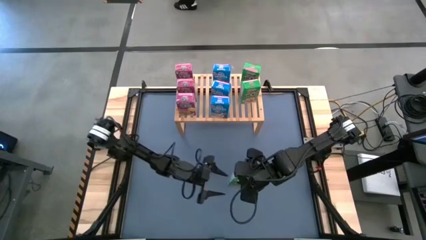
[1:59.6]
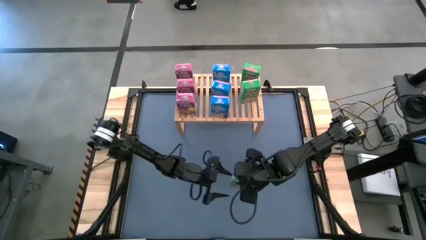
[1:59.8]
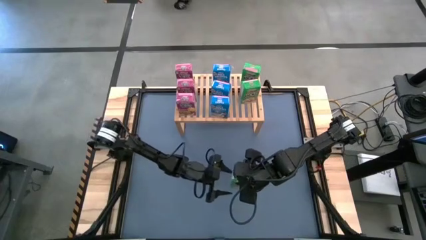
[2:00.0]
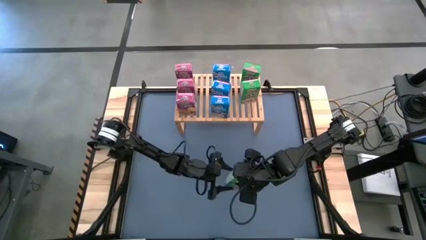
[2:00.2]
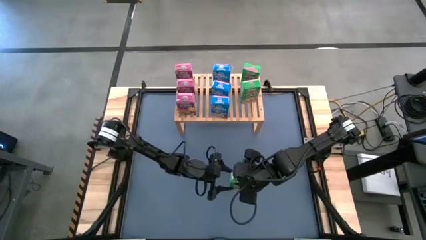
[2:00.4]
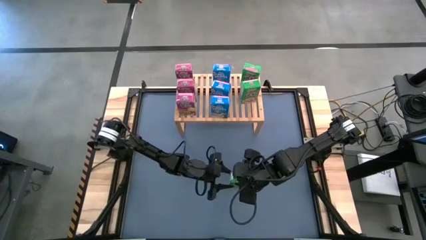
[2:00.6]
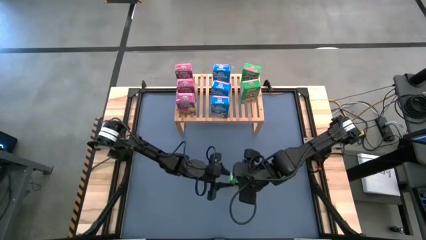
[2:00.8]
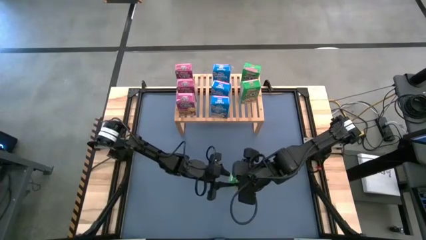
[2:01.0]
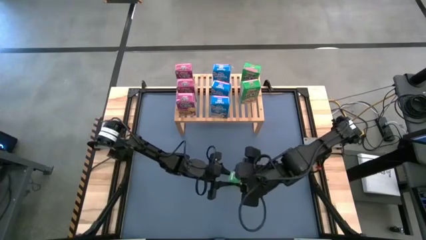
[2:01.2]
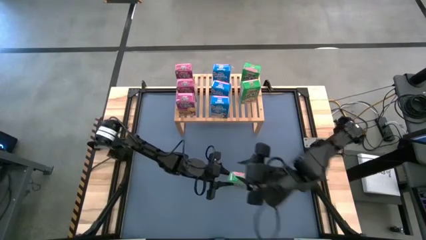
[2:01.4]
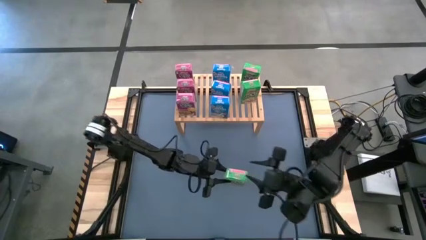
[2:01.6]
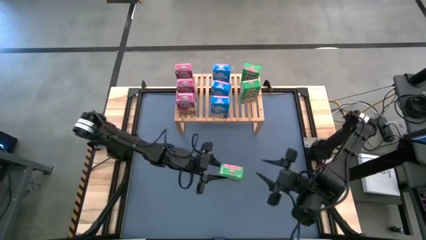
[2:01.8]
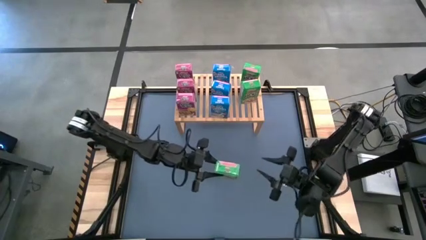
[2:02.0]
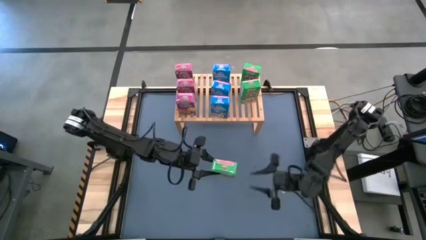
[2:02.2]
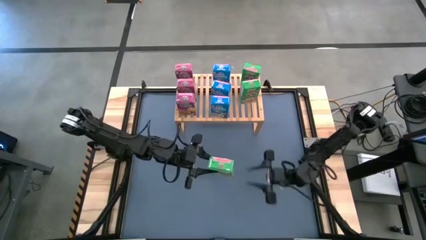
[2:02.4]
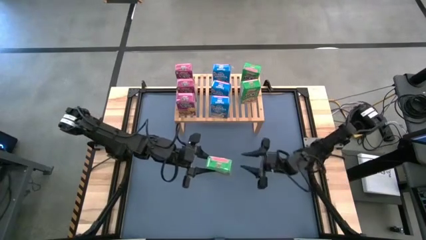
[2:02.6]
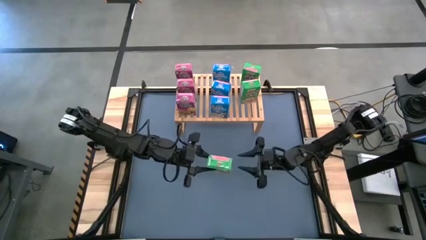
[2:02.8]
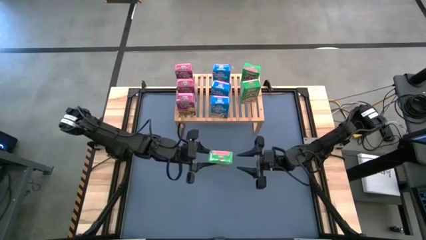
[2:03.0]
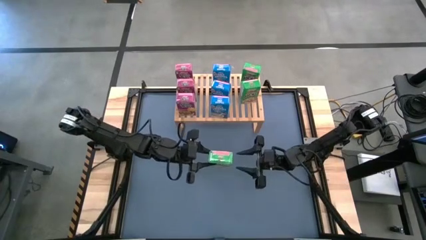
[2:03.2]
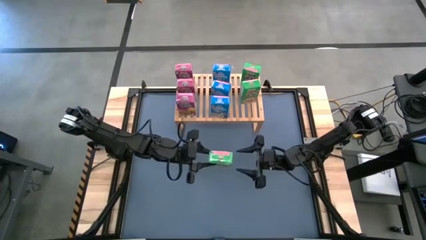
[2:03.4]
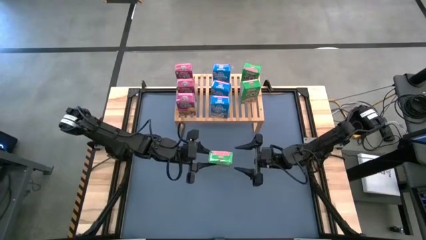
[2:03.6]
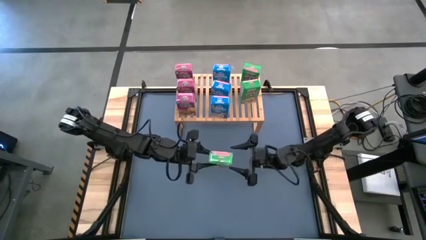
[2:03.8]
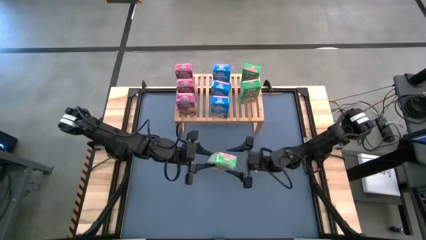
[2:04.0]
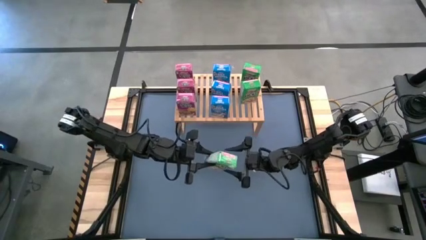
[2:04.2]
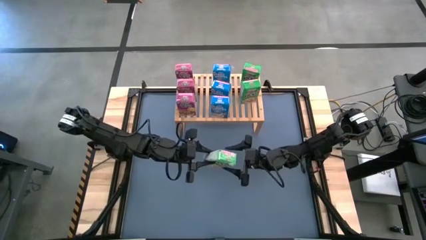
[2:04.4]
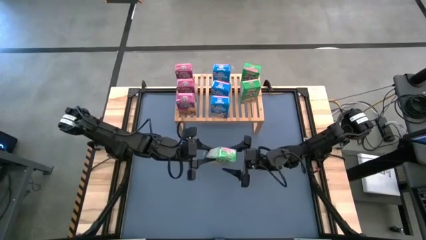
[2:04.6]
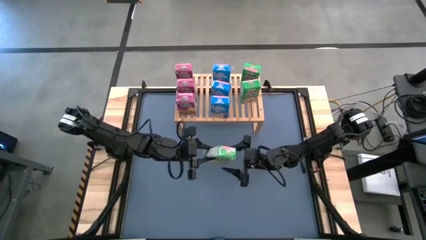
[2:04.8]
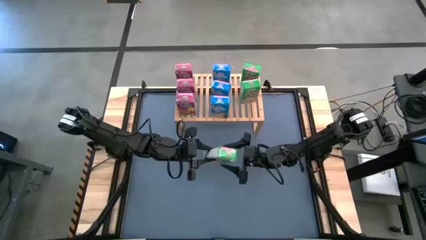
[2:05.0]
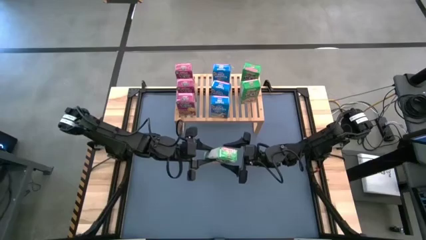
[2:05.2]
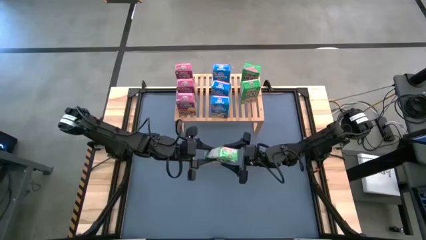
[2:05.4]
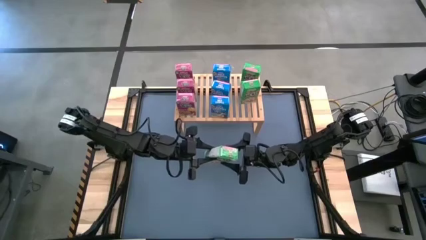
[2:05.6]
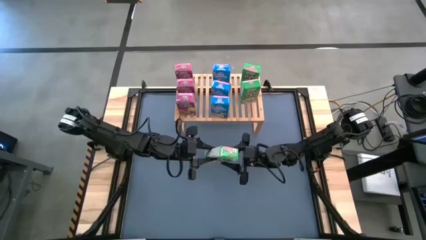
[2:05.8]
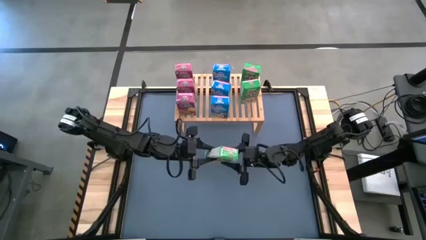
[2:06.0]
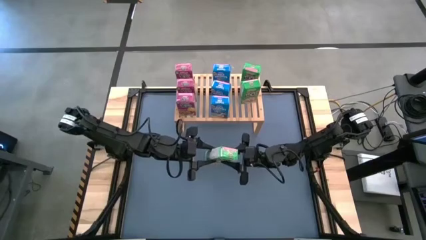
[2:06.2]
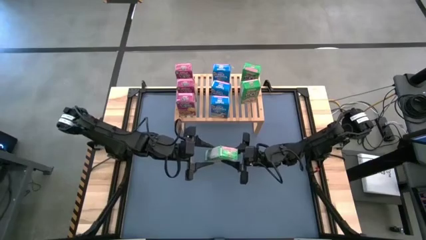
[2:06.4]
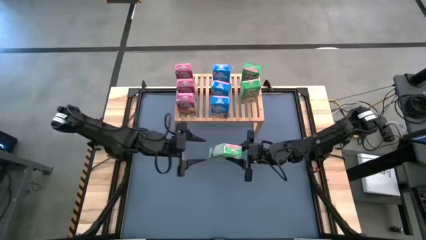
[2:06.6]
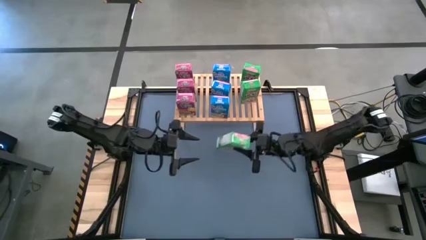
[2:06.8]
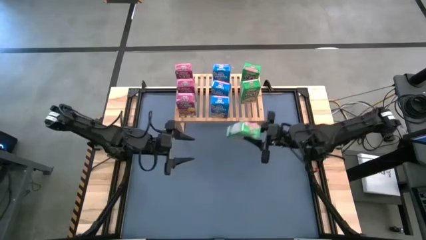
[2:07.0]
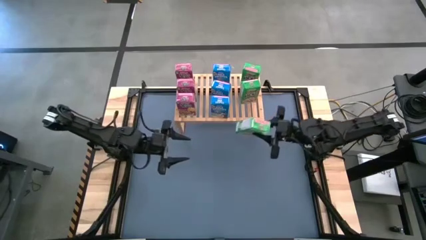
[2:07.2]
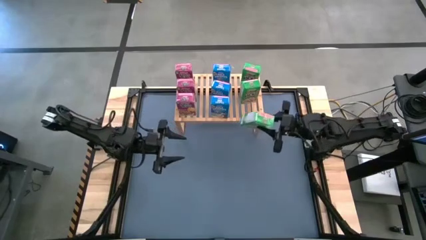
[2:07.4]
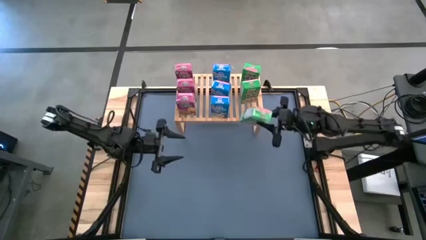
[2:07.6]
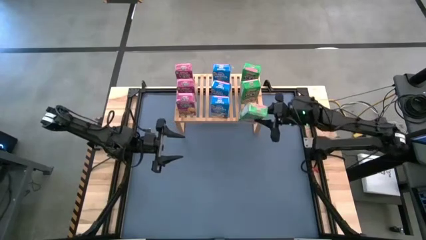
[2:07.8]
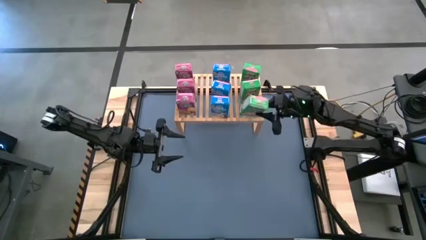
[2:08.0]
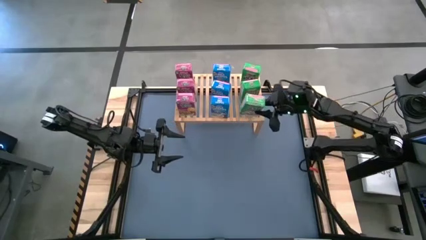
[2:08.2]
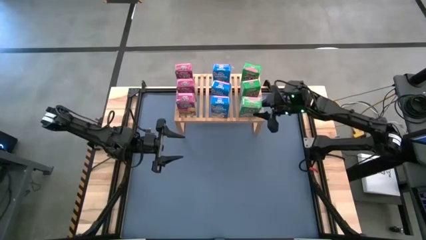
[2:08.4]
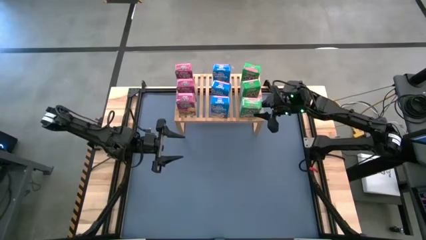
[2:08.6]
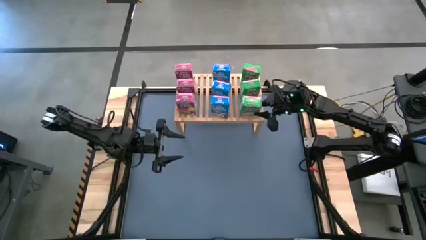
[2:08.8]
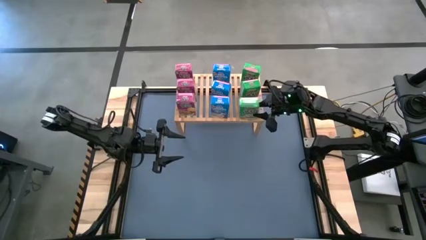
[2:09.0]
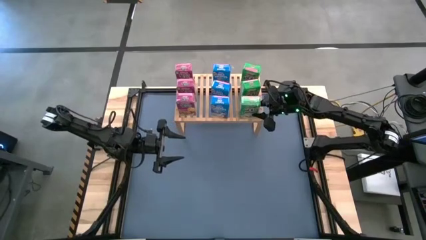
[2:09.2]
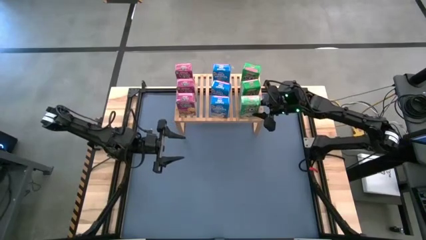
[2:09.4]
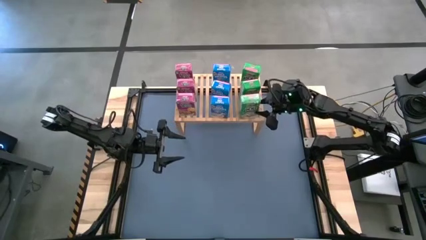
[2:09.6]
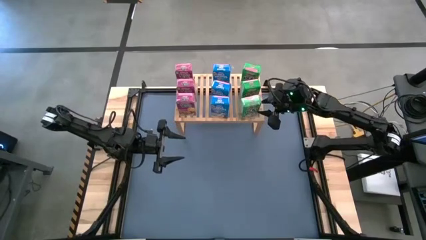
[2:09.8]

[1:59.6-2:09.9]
Task: Stack cereal on shelf
Put the green cereal box on the shelf aligned with the other green cereal boxes

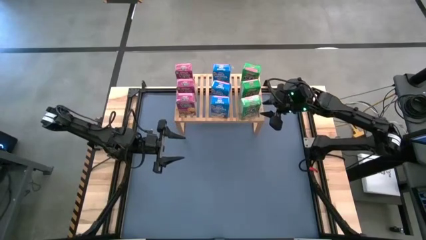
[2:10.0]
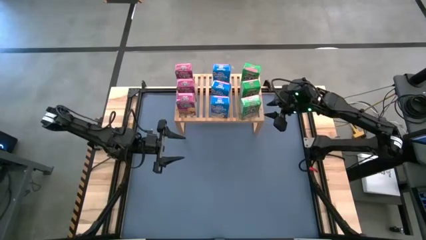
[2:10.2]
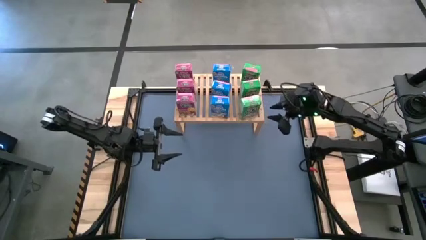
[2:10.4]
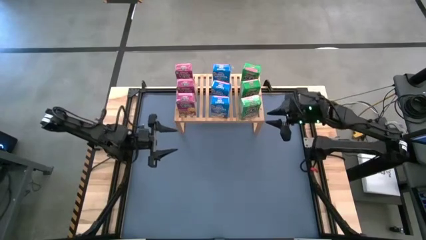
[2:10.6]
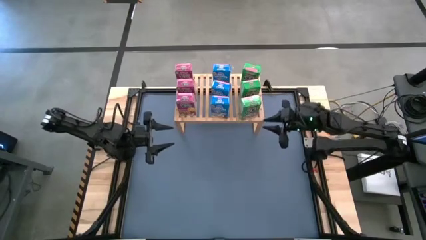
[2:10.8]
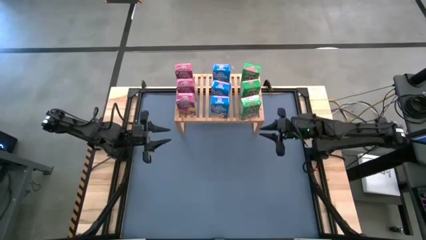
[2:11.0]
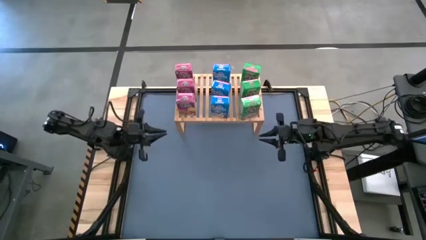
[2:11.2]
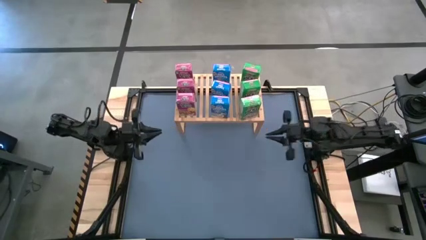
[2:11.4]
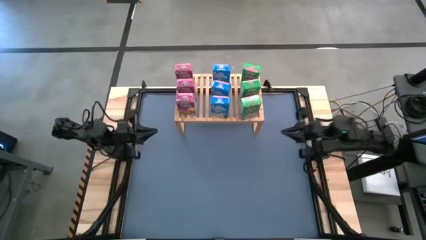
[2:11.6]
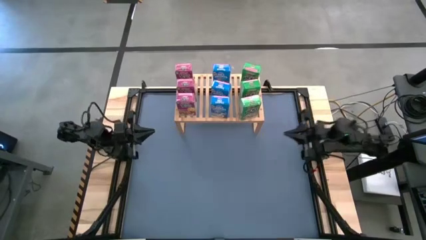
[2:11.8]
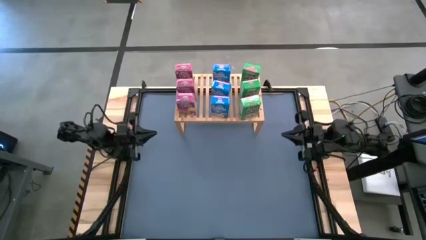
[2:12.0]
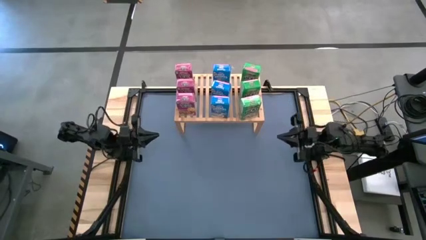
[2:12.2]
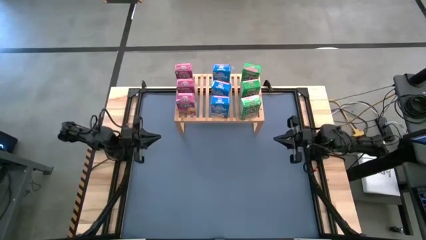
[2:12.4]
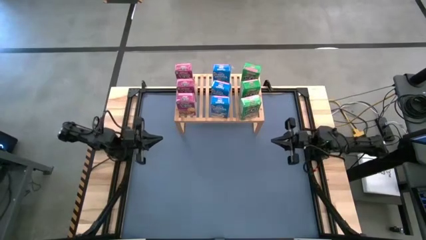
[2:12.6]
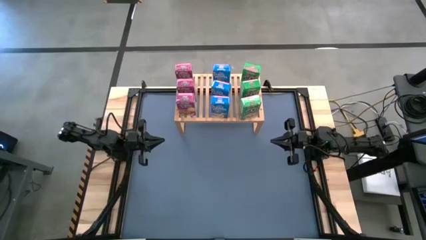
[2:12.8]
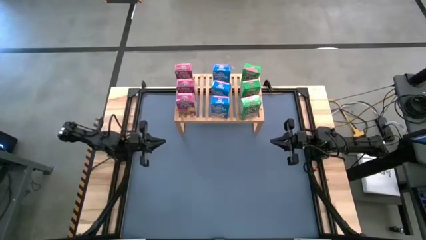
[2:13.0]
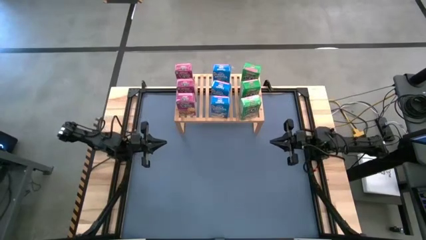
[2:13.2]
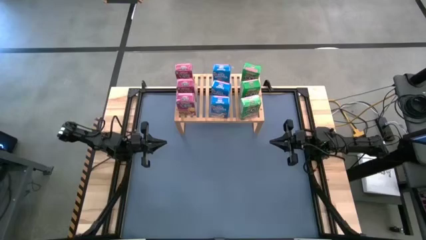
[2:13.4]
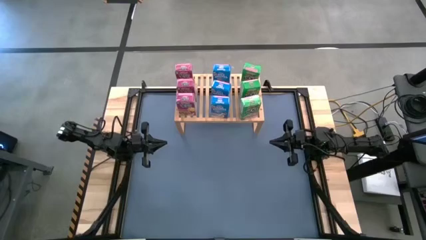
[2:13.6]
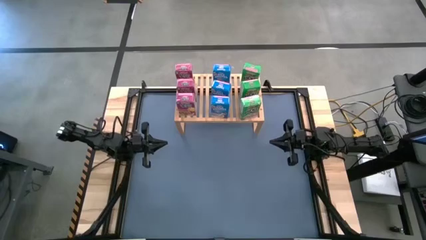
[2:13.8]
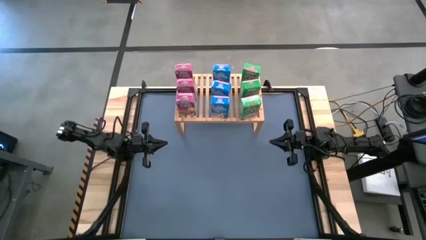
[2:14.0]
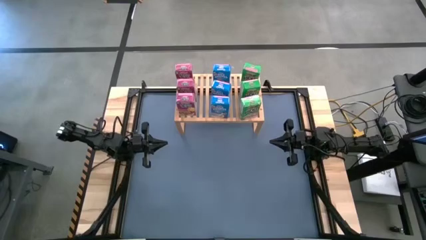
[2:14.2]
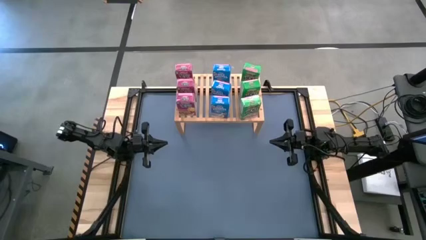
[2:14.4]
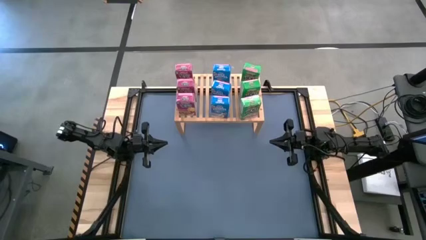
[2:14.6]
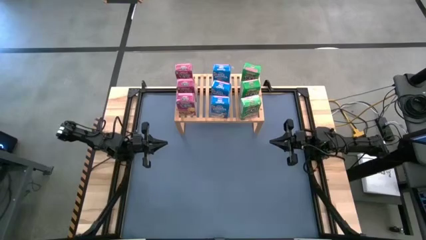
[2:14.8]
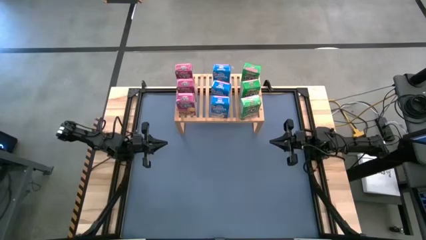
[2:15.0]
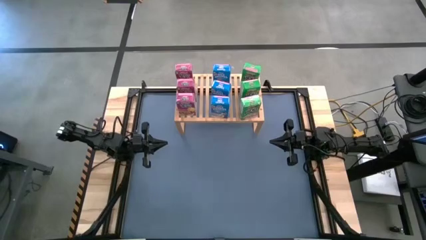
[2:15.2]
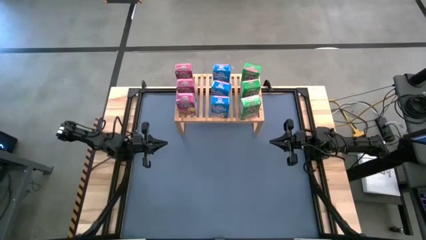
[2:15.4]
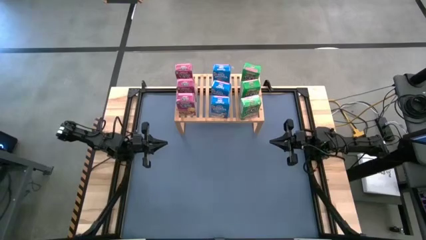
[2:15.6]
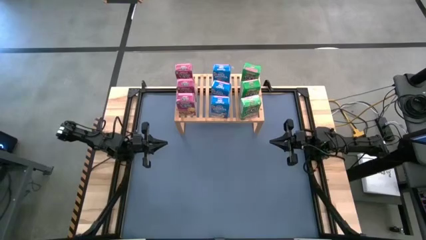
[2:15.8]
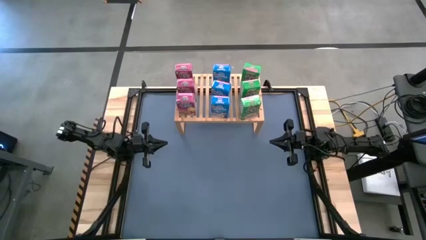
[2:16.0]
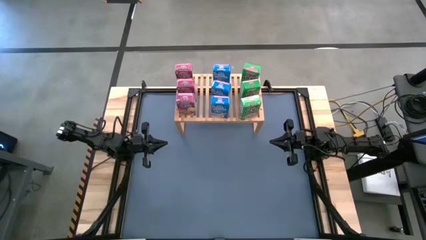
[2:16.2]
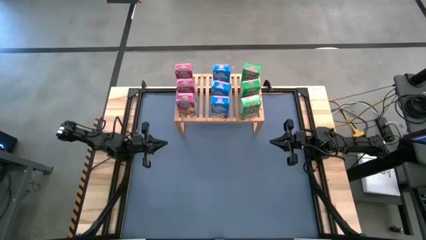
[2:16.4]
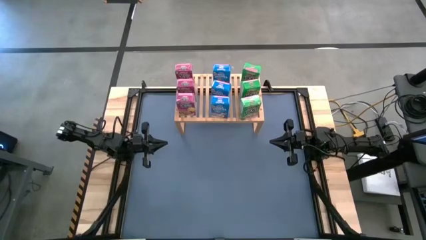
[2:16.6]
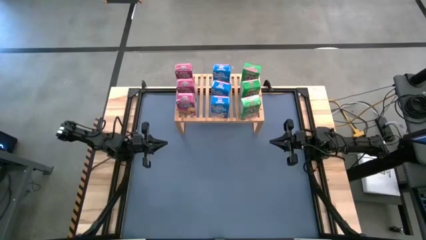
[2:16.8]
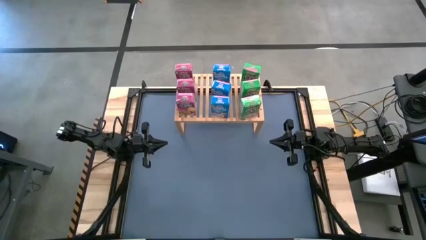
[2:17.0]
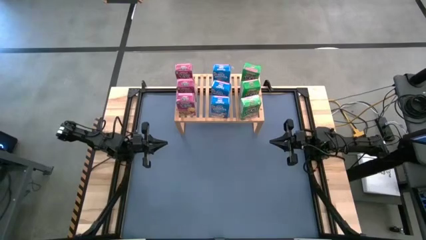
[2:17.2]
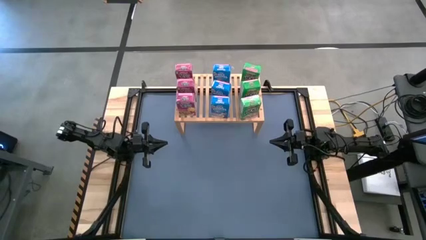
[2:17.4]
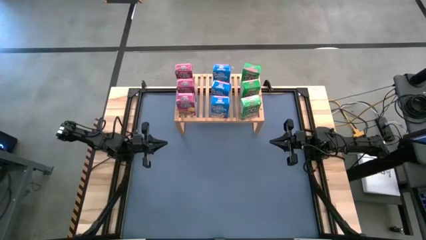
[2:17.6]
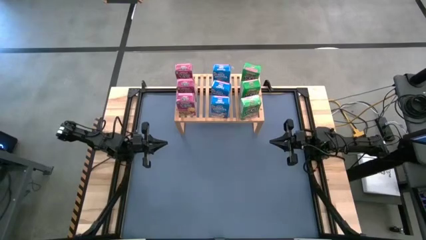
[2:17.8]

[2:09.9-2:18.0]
Return to Home Position
